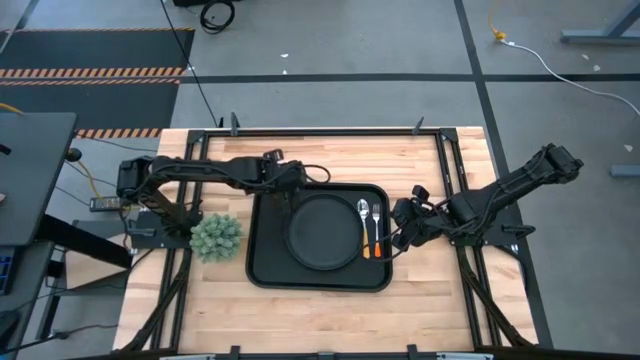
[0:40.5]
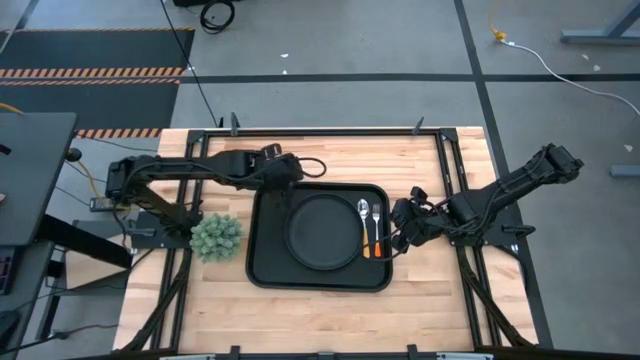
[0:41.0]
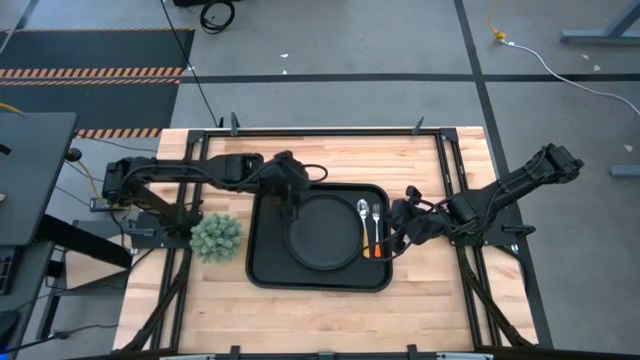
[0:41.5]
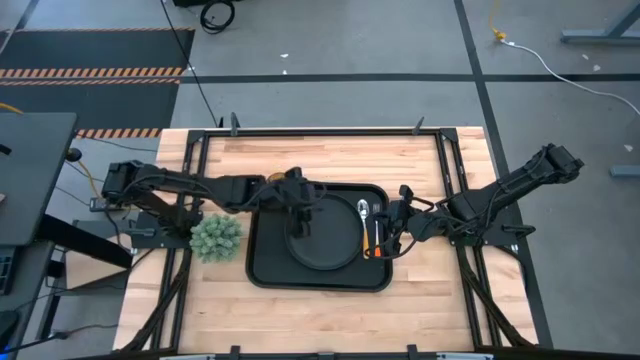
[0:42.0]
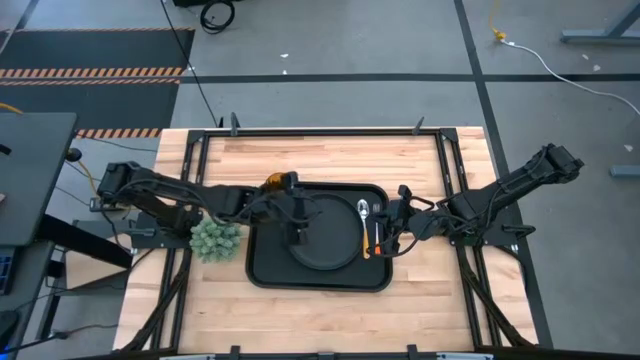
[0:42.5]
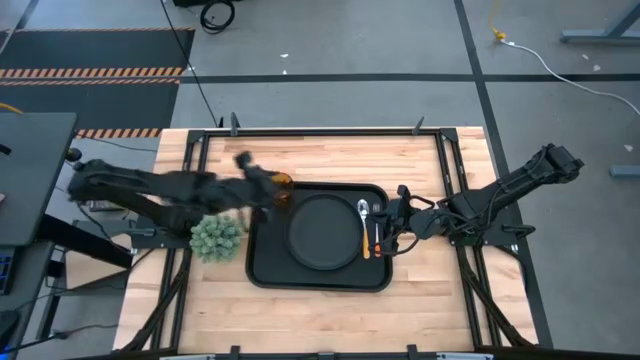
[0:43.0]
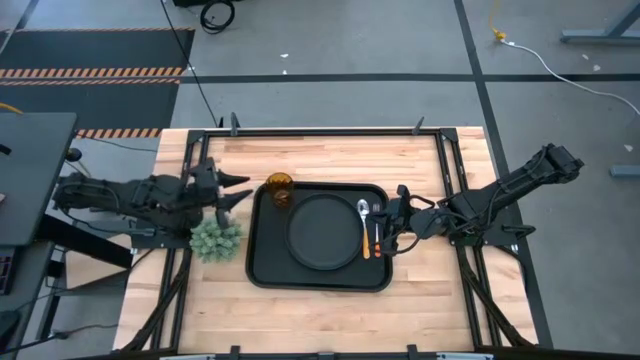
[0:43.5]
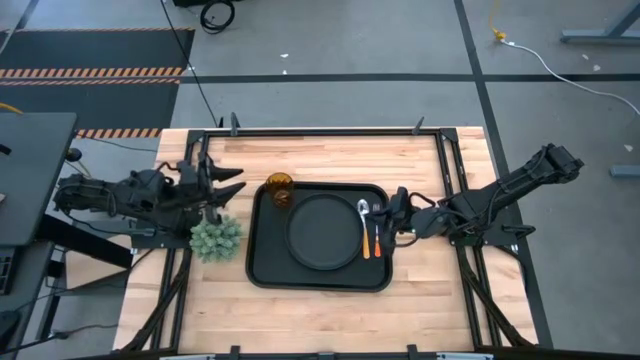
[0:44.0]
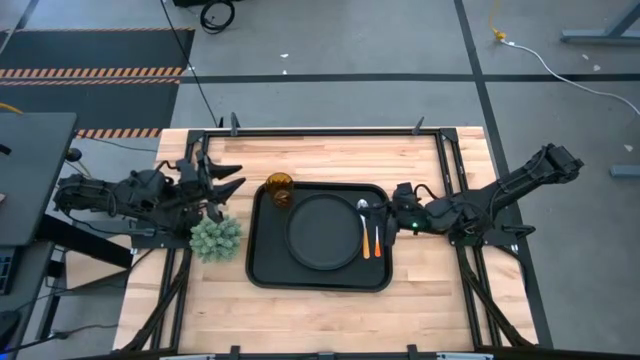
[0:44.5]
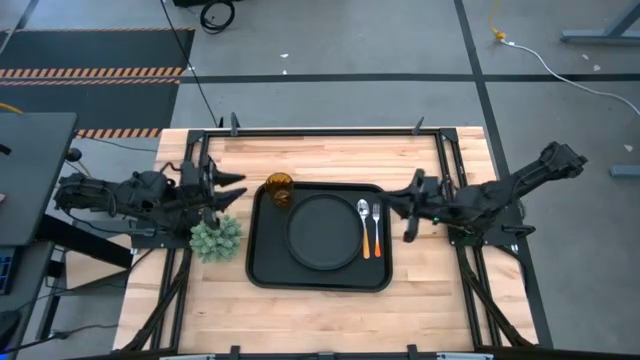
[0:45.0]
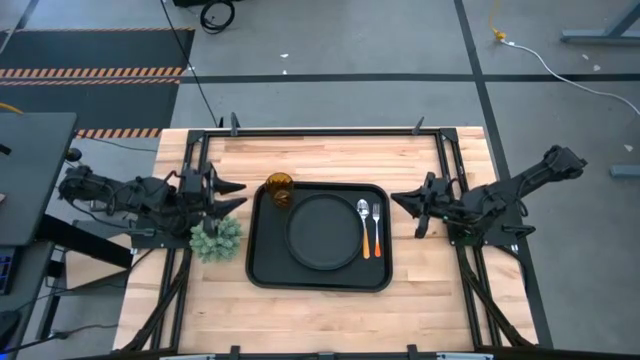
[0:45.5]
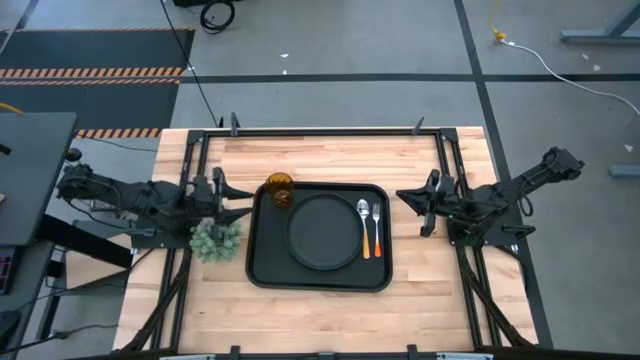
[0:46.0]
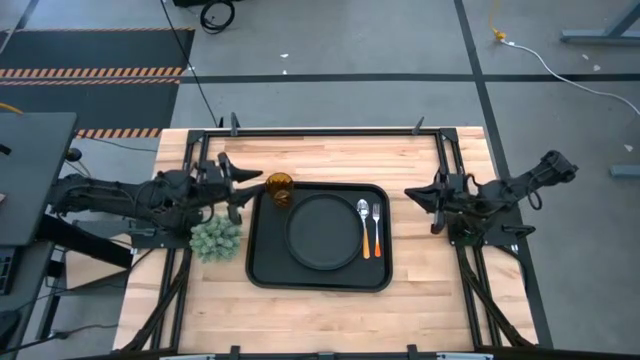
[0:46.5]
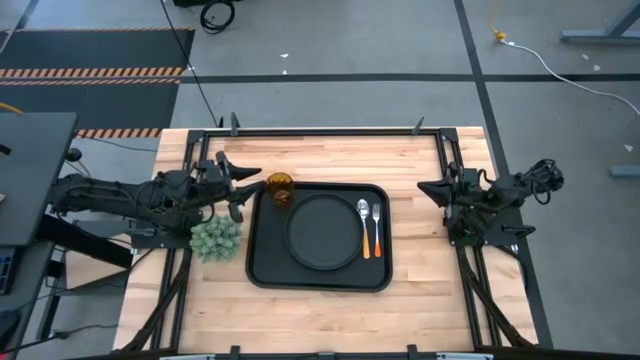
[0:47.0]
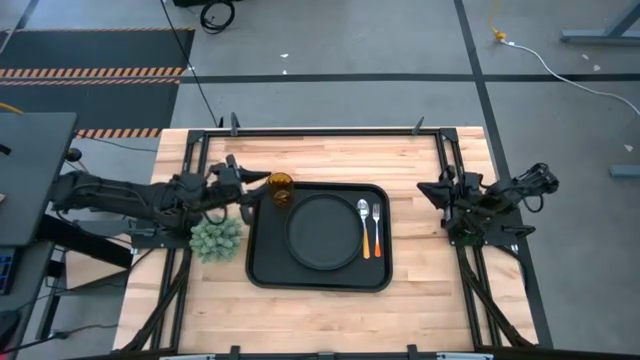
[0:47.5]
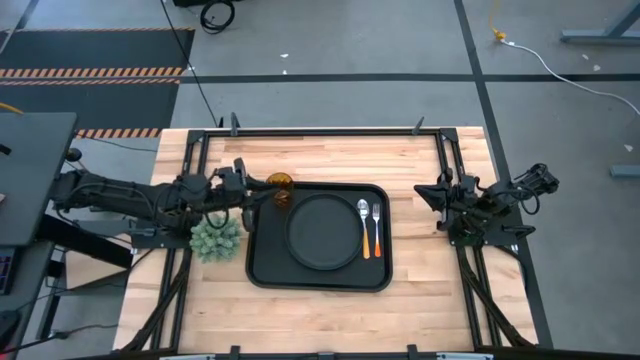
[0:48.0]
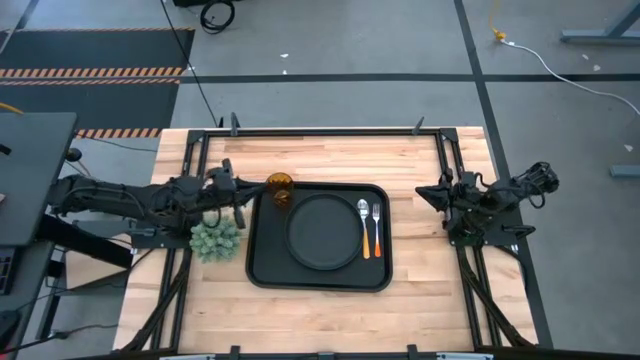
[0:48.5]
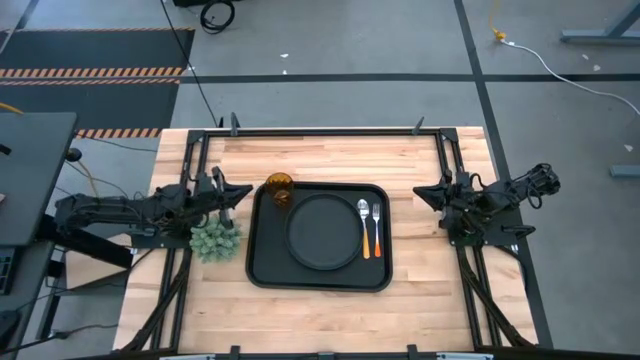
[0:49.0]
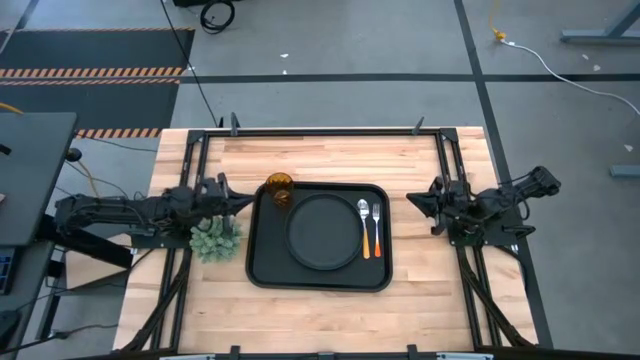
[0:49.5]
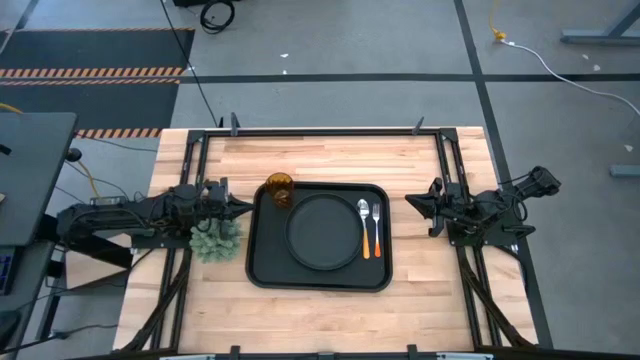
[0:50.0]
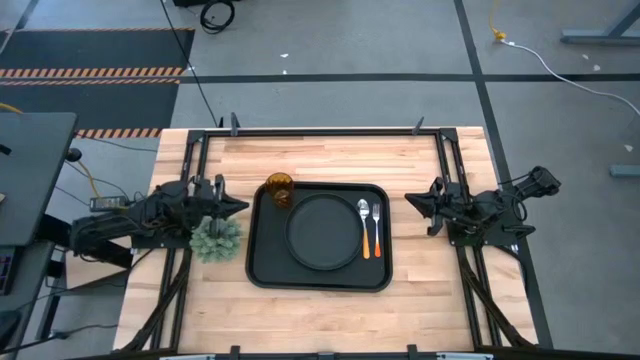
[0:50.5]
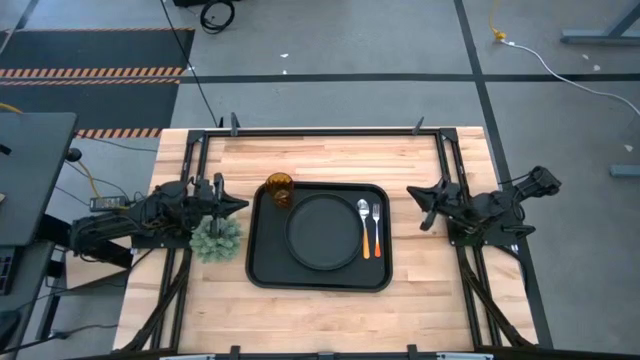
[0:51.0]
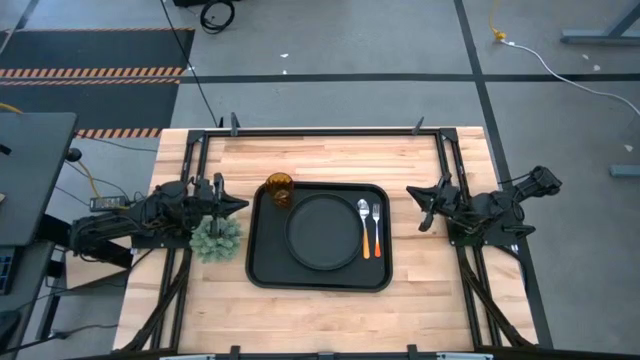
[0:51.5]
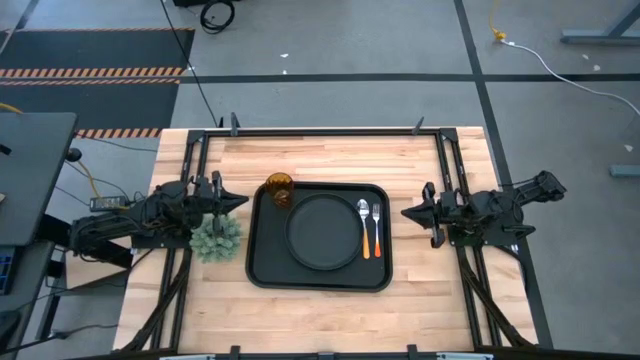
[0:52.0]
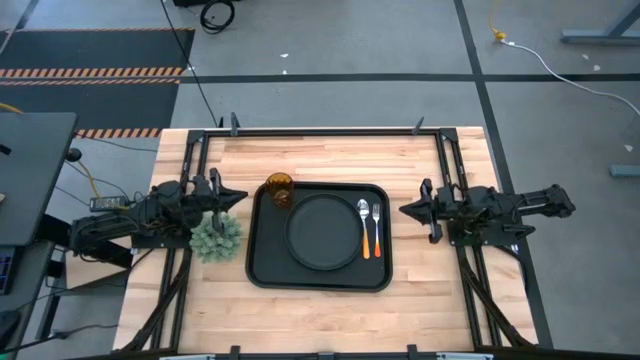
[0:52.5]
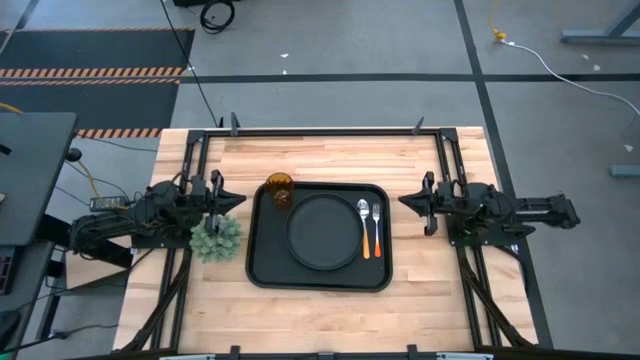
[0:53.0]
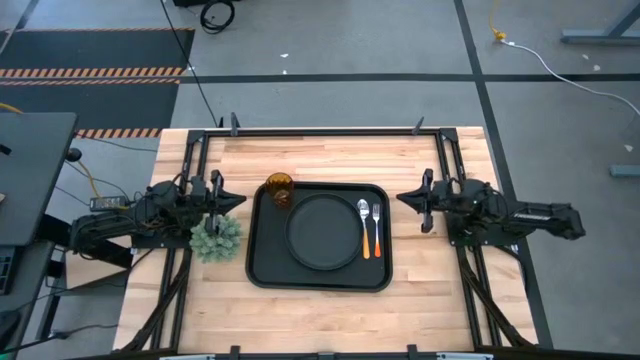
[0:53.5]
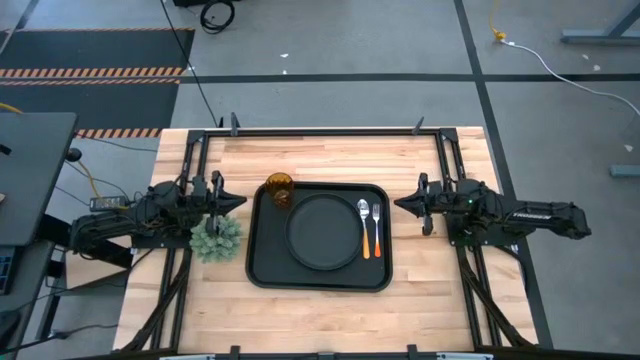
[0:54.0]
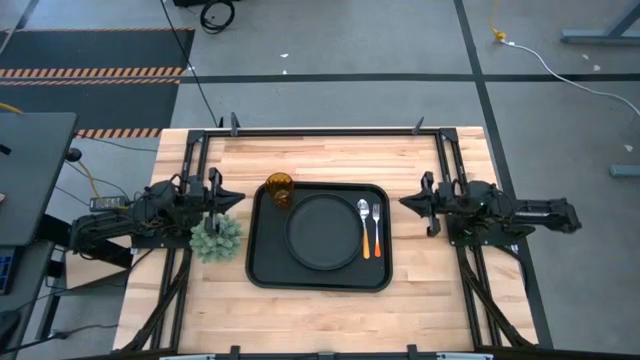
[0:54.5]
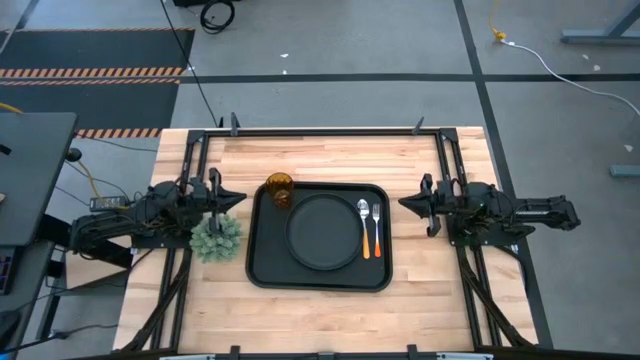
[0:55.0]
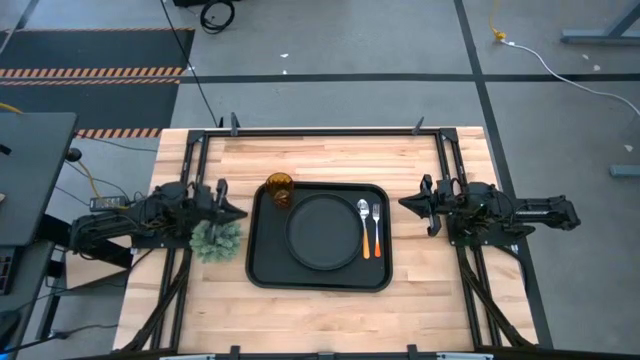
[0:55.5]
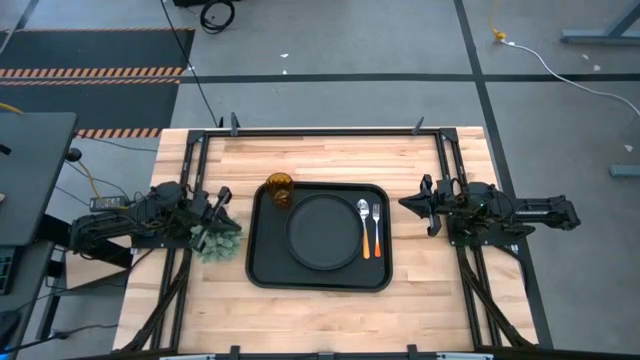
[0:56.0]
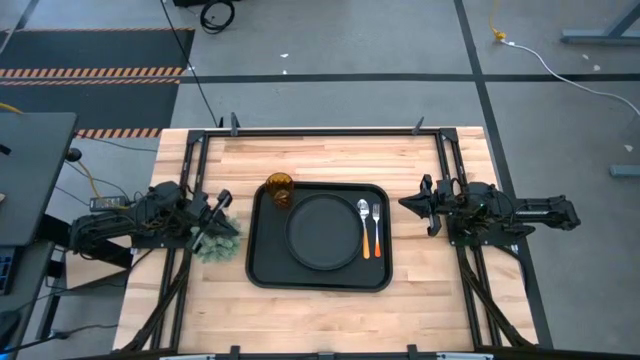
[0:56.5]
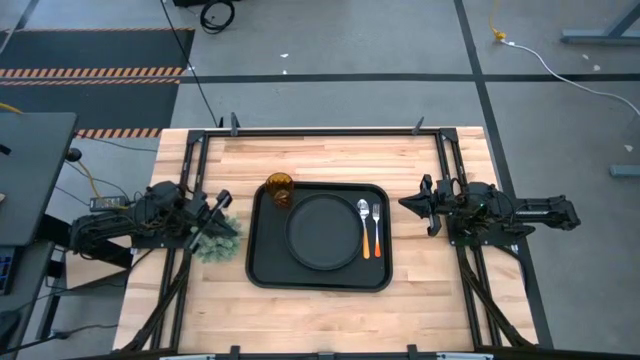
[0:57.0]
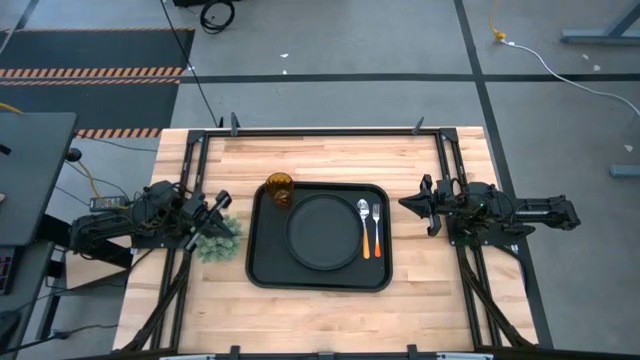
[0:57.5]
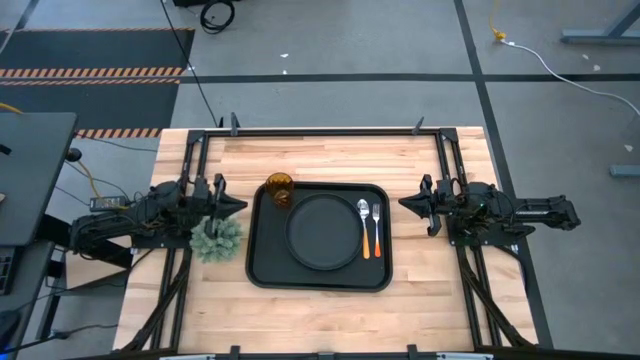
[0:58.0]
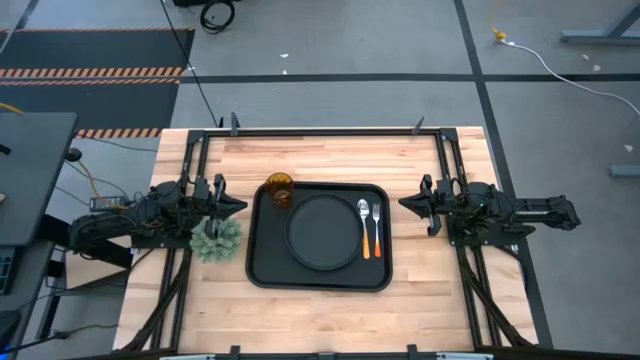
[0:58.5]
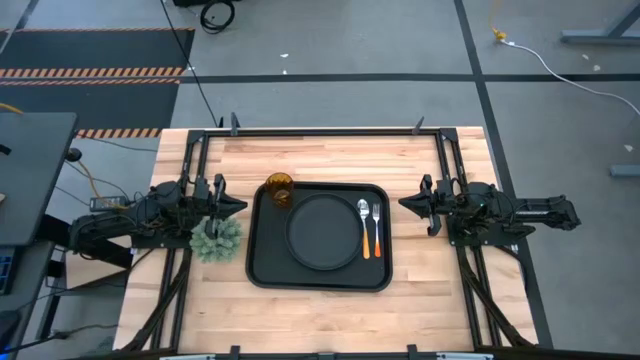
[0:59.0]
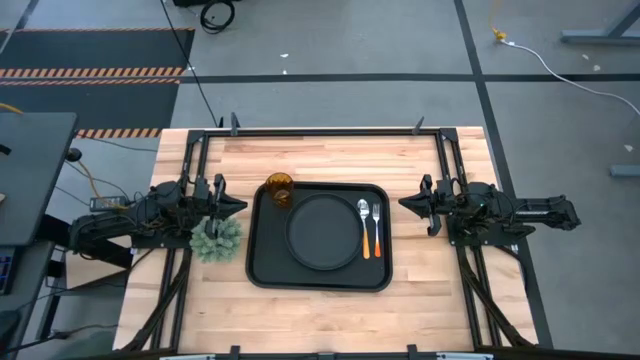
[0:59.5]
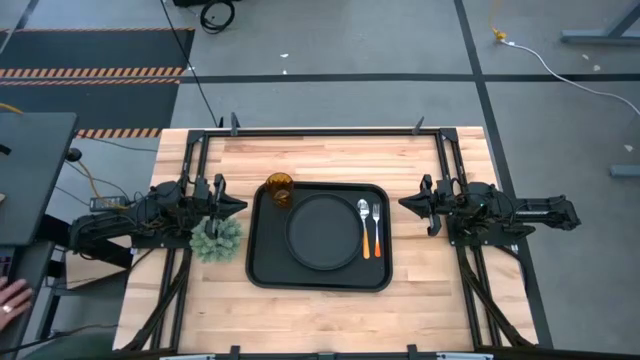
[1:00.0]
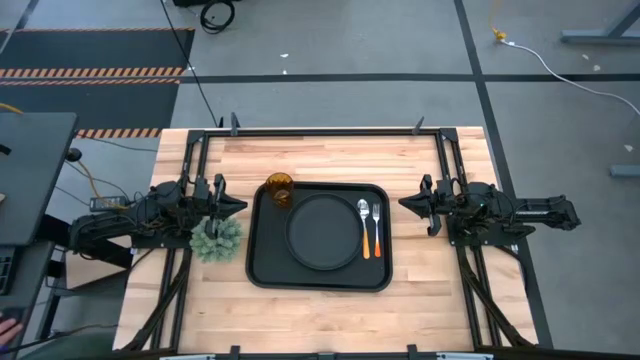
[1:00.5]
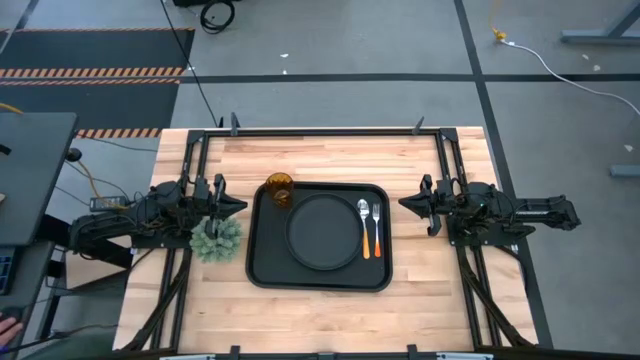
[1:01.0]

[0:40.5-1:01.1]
Task: Pick and place plate/cup/fork/spoon on tray
Return to Home Position
